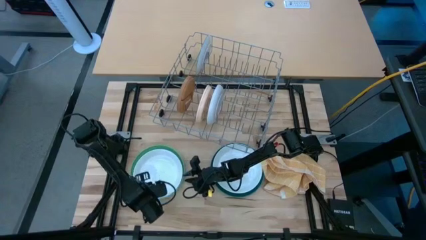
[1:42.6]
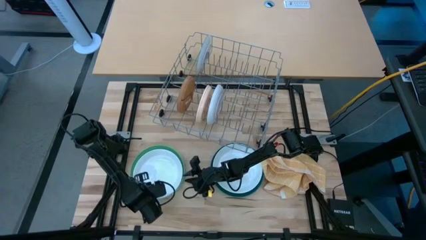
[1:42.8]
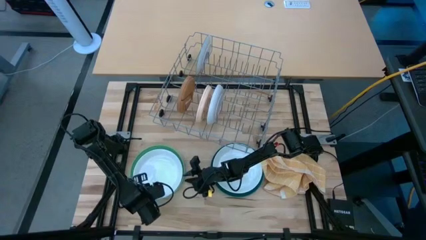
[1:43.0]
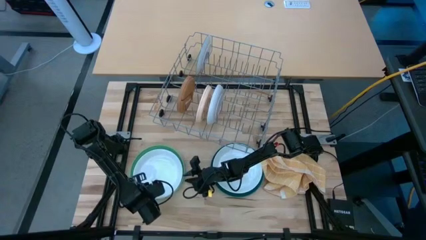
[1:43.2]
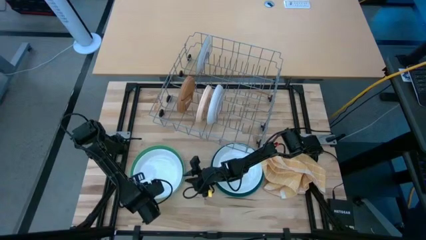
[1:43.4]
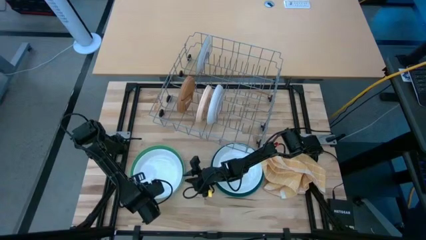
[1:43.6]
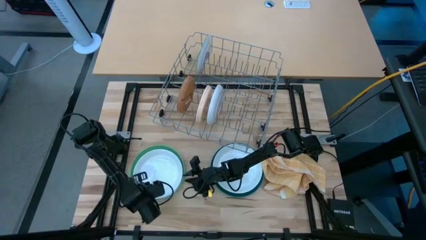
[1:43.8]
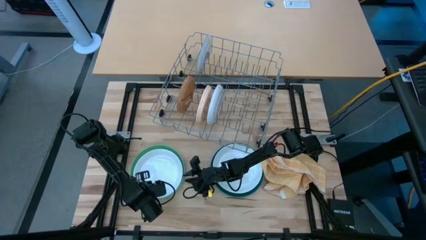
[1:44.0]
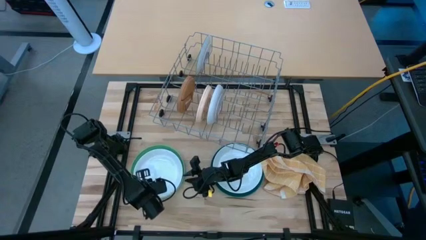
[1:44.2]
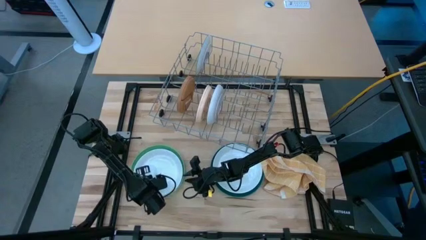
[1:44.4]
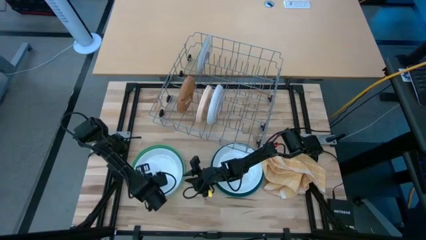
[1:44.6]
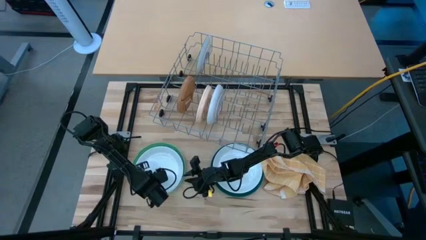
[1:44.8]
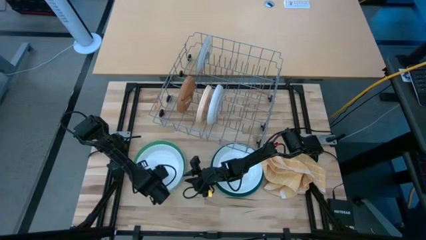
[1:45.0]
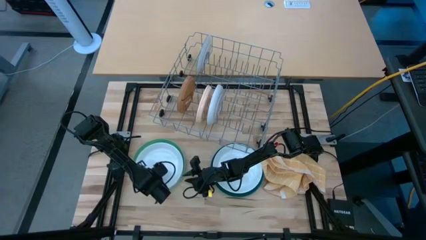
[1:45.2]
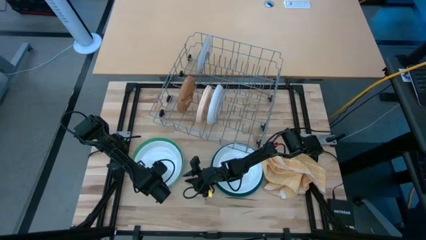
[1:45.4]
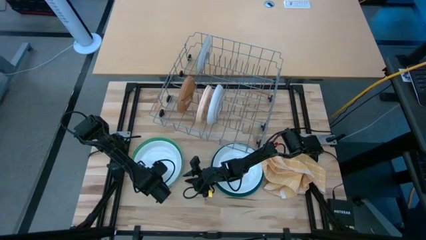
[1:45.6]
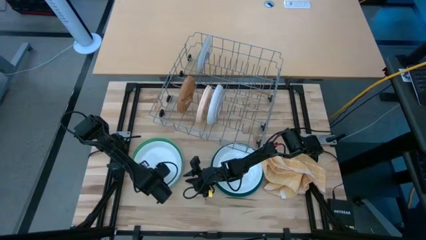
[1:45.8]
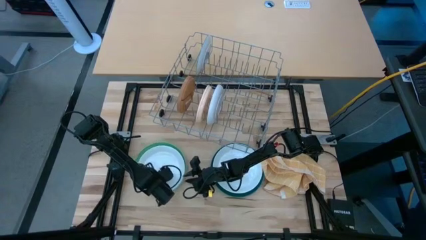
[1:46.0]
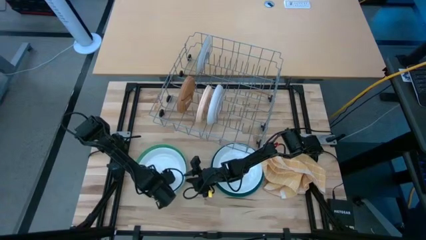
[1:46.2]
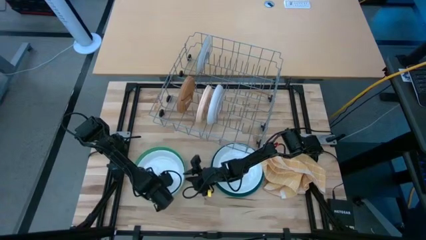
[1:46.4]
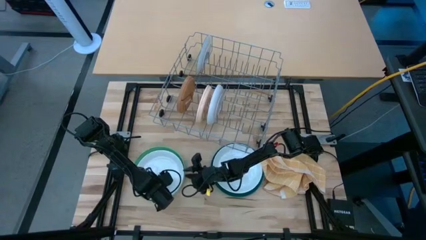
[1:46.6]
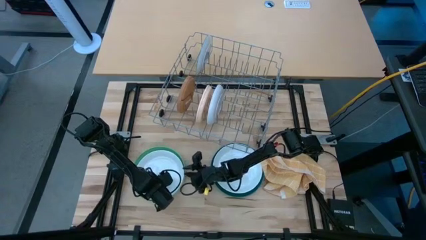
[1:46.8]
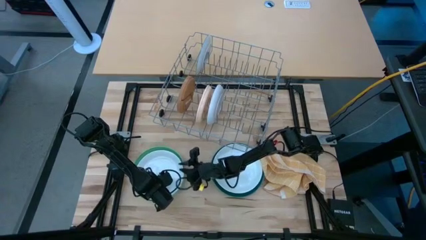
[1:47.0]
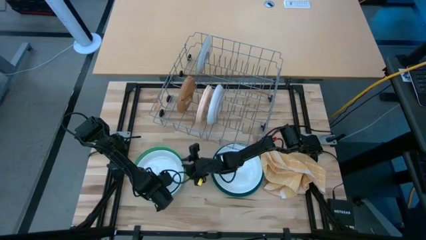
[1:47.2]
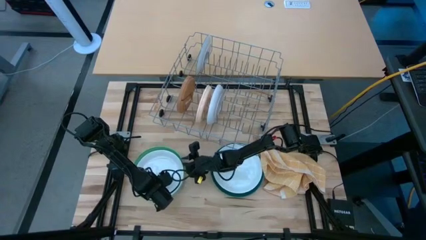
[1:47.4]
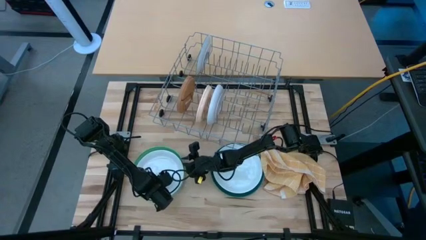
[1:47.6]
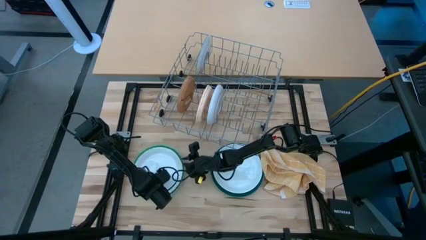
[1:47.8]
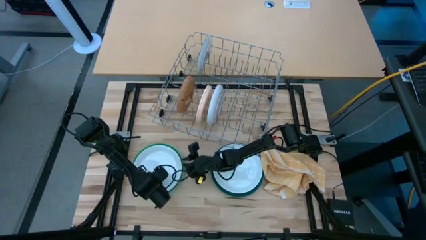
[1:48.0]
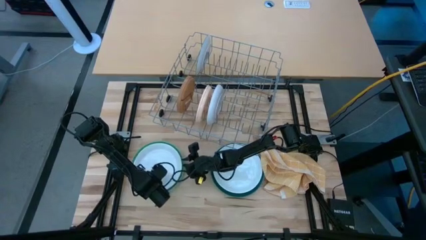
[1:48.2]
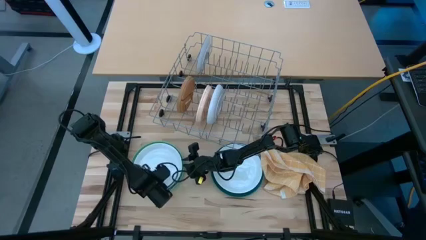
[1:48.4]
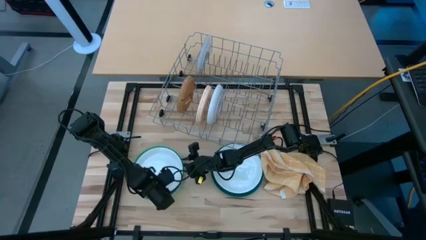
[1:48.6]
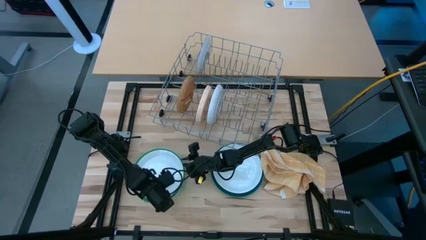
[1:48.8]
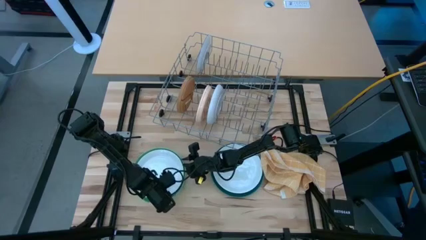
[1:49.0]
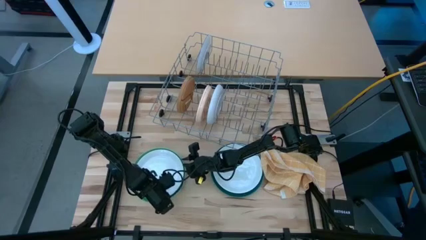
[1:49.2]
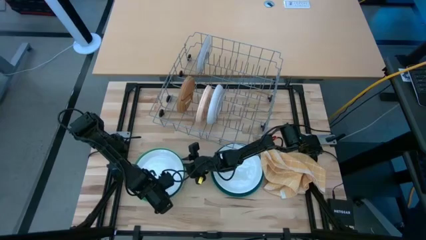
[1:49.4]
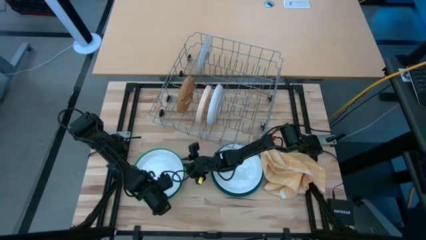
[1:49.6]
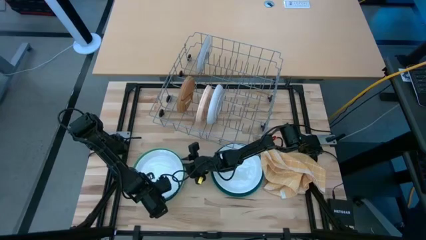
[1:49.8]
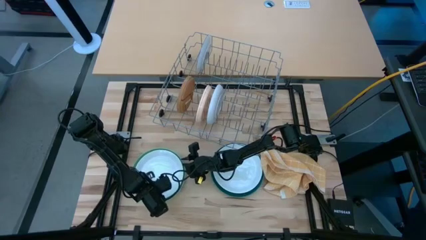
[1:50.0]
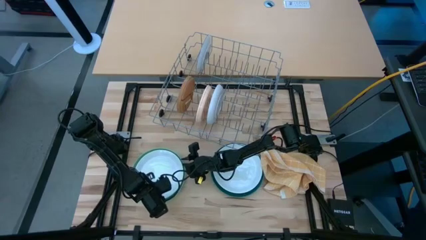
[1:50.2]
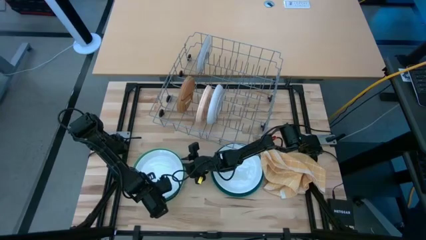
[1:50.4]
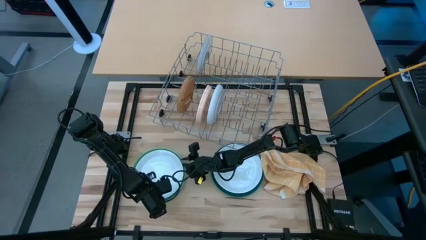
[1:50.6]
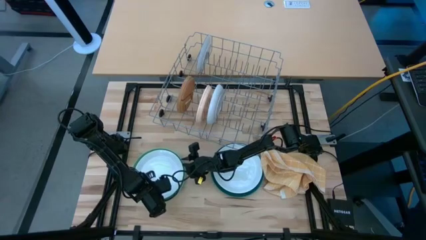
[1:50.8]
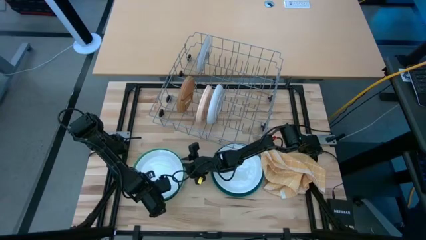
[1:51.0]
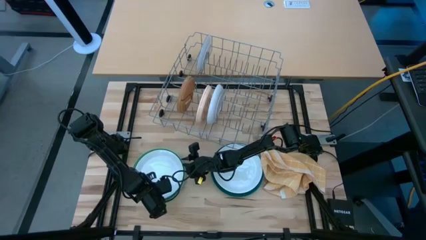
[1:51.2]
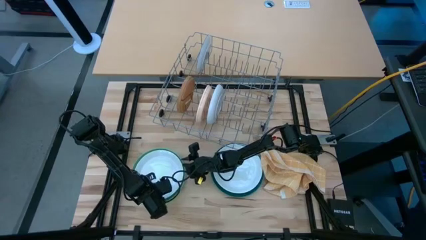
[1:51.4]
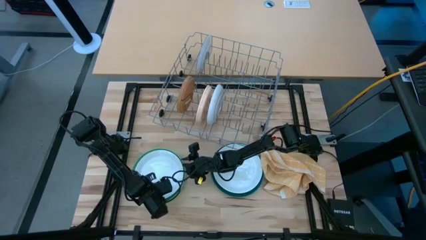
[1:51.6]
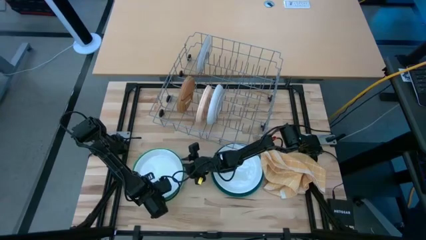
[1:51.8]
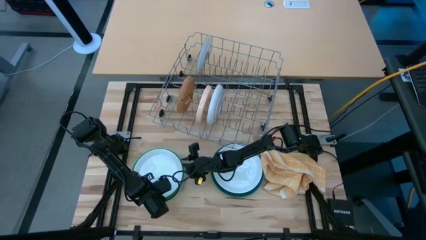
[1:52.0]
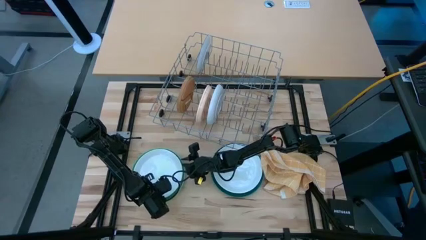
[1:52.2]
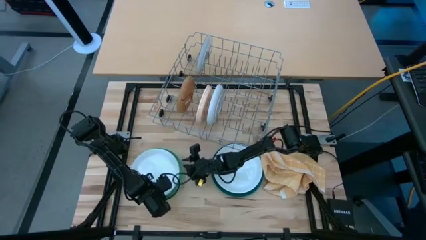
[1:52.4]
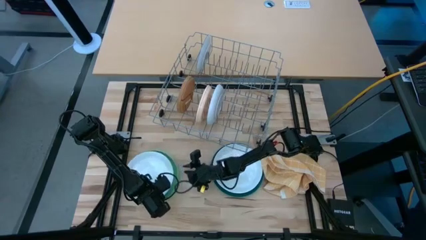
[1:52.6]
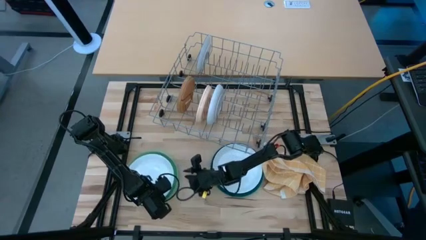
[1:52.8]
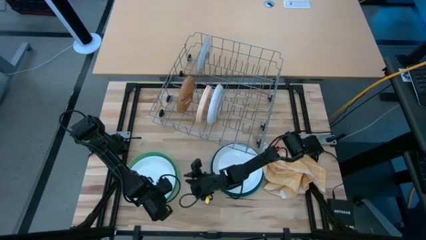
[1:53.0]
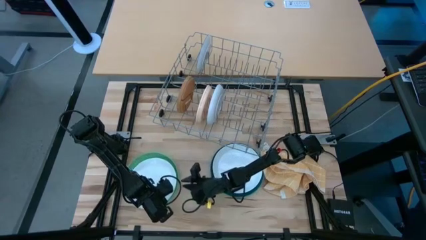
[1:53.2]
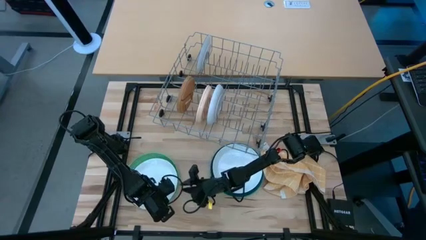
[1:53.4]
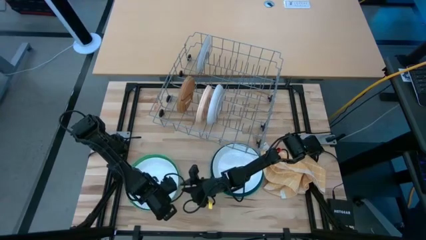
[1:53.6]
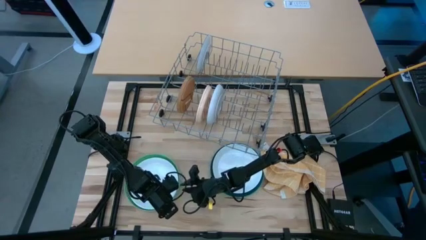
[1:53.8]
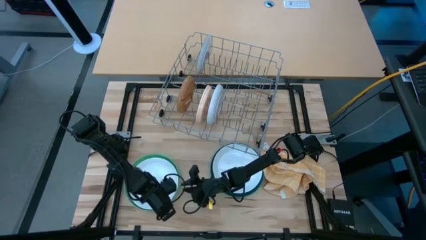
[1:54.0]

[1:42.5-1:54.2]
Task: Sort dishes
Put the left white plate in the dish rack
